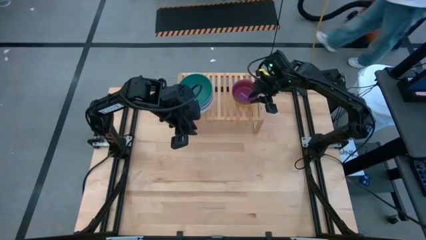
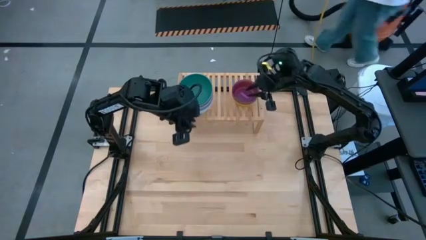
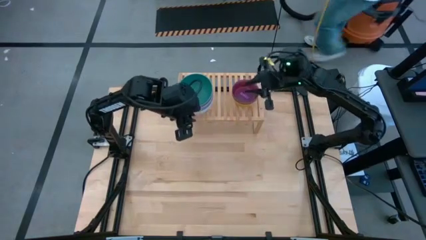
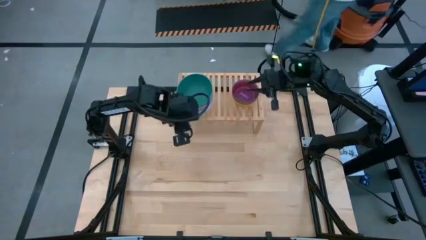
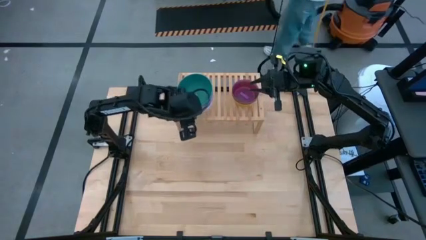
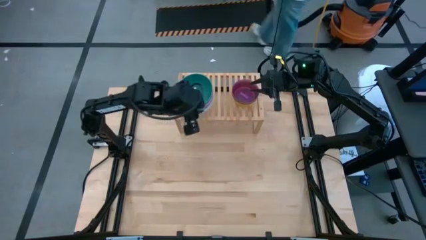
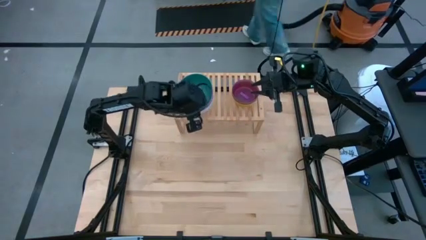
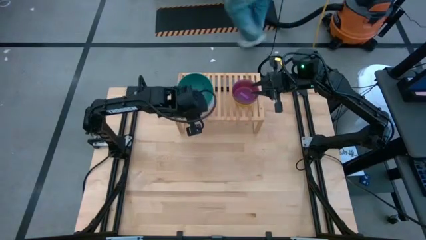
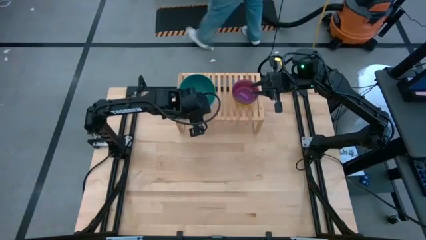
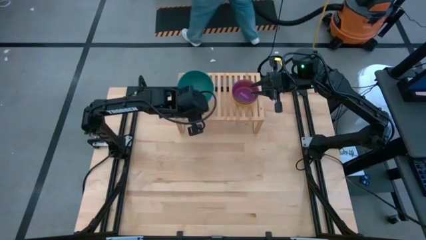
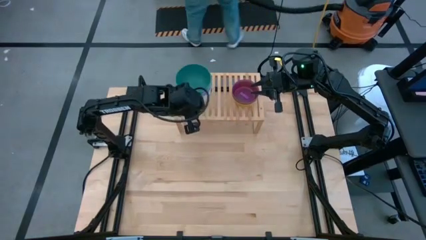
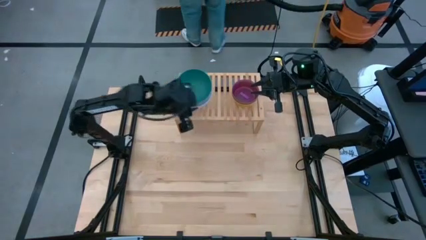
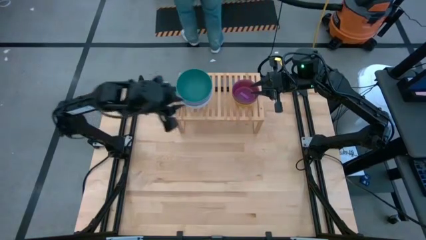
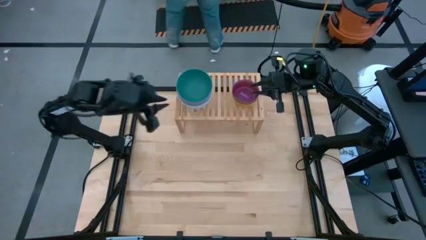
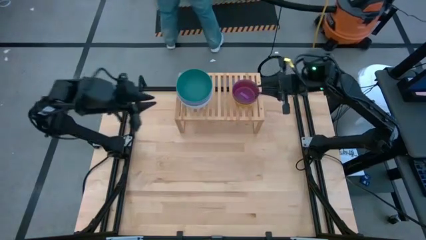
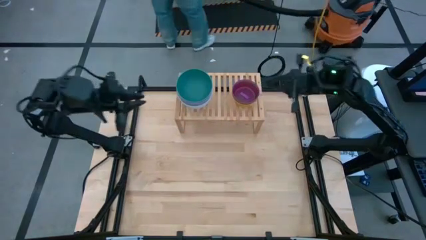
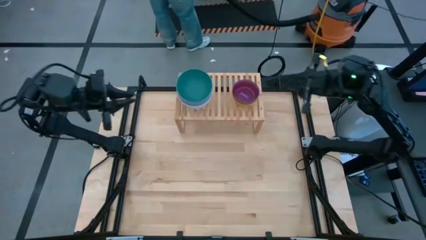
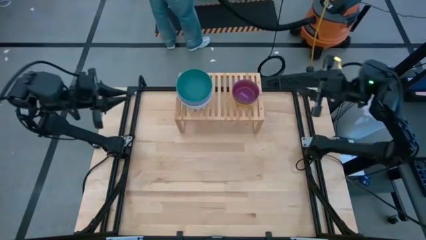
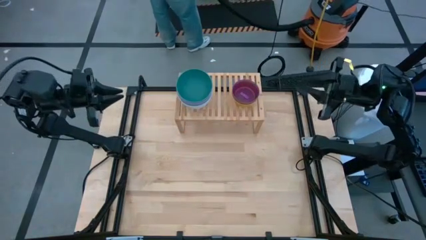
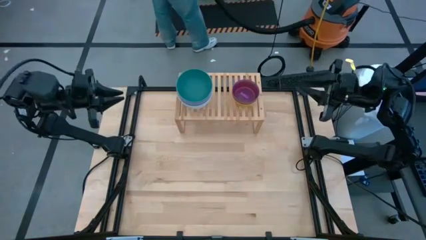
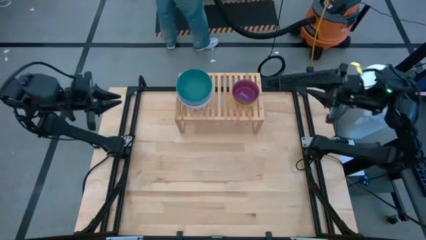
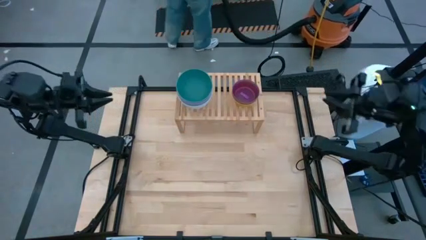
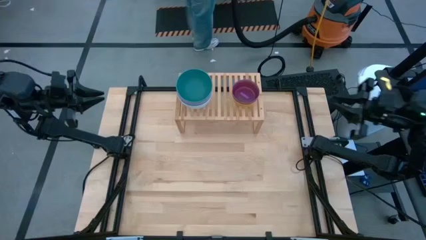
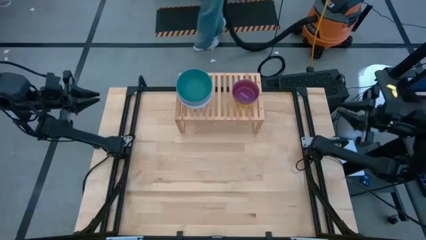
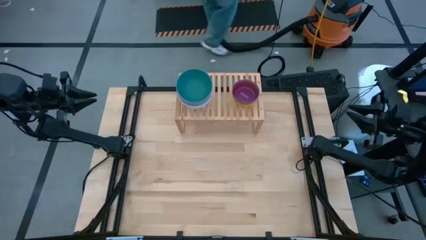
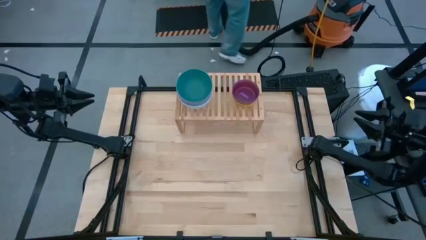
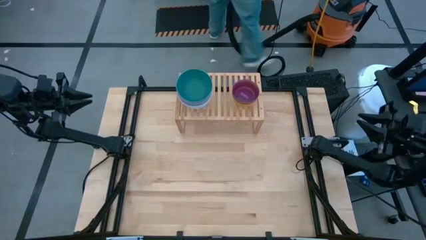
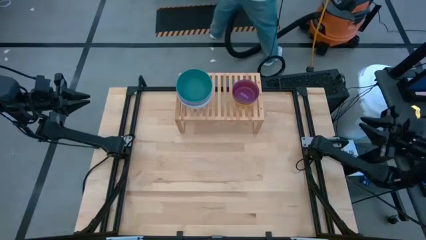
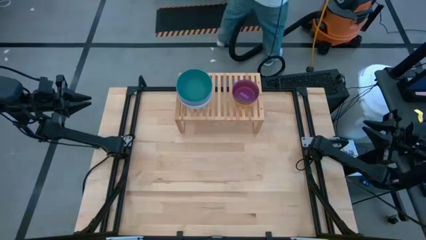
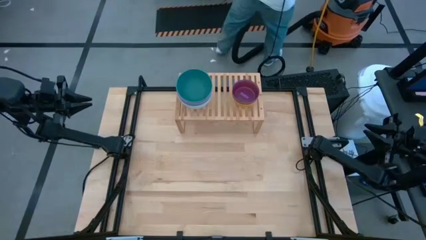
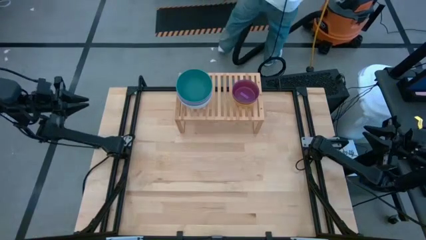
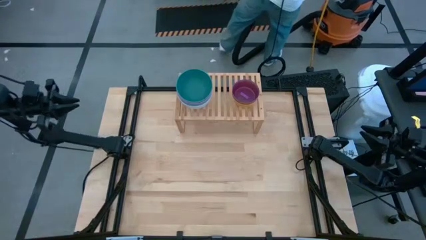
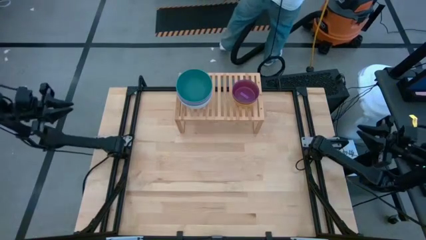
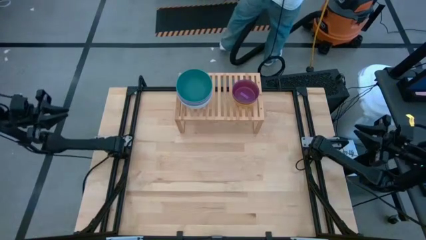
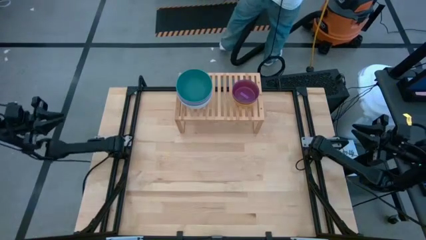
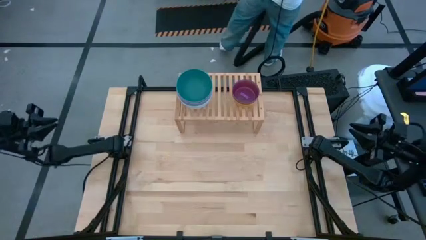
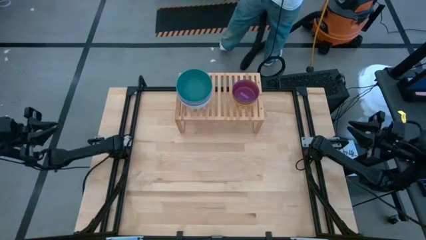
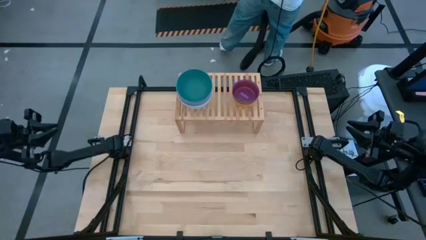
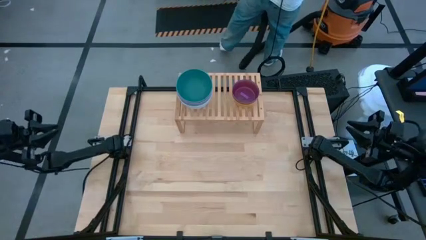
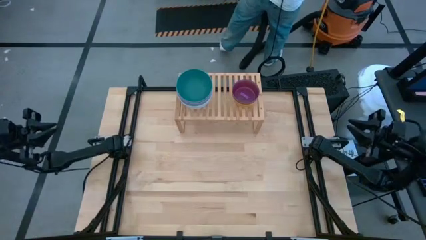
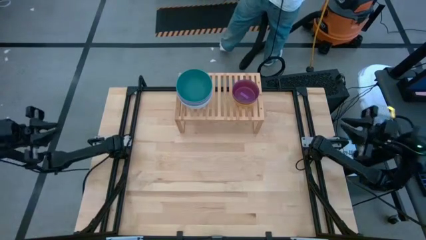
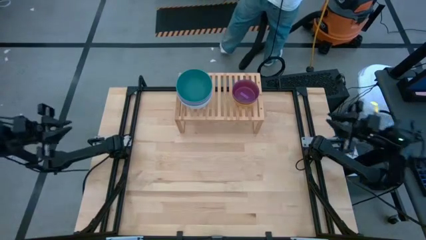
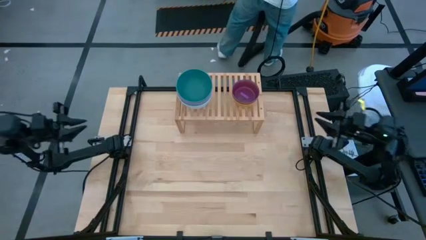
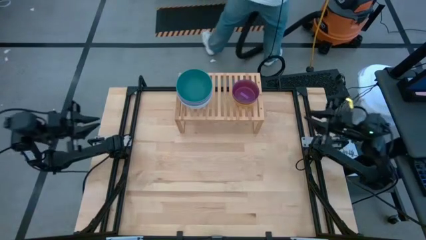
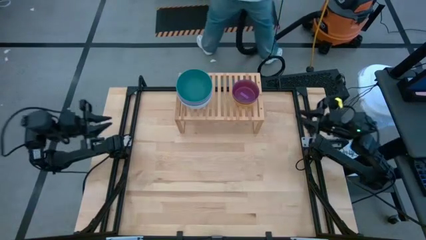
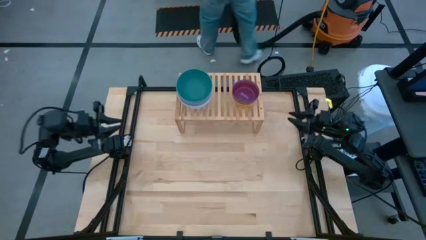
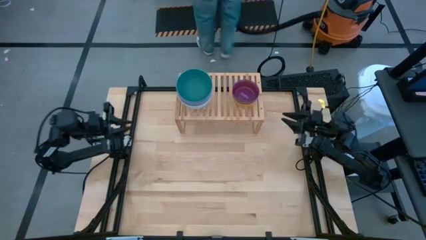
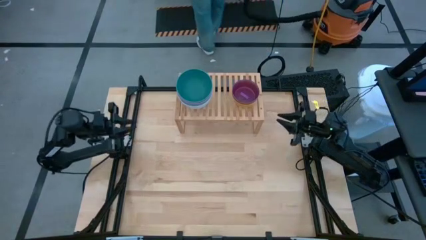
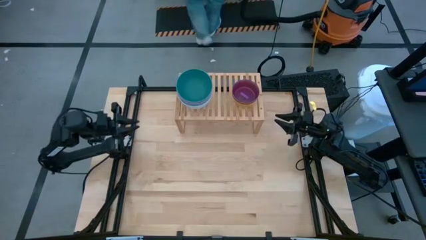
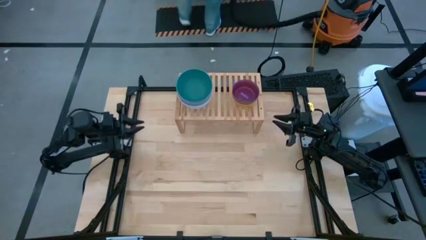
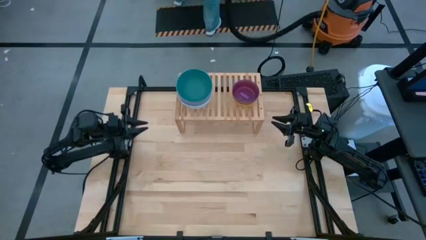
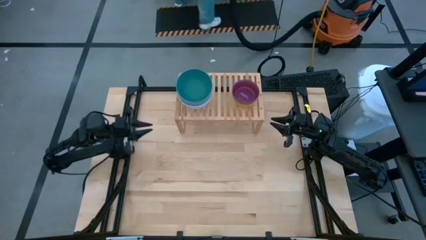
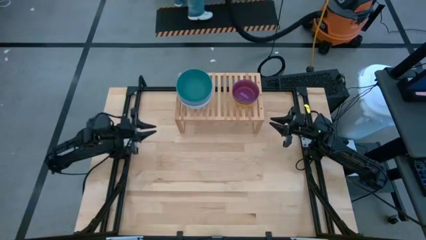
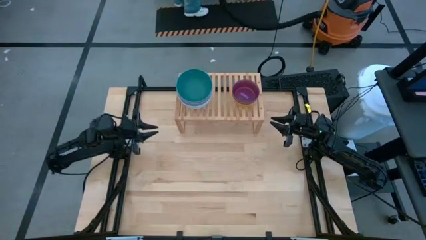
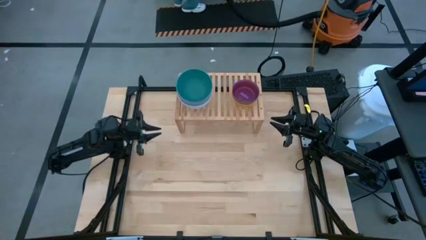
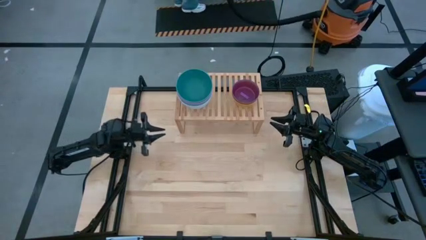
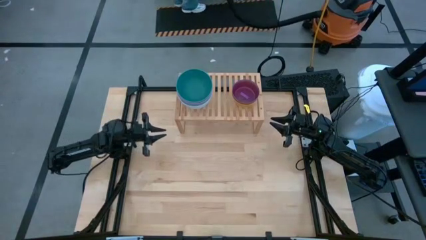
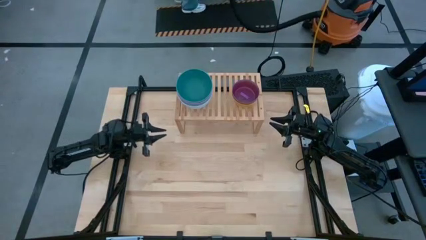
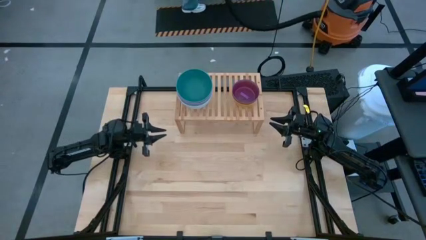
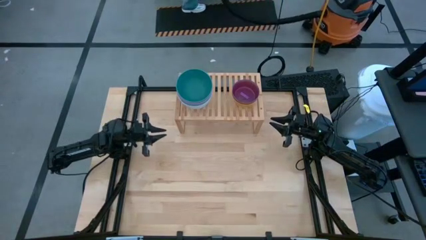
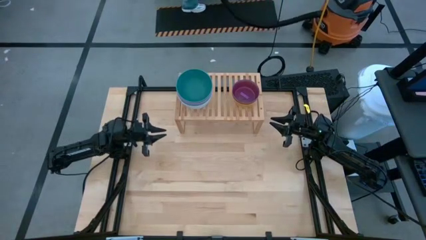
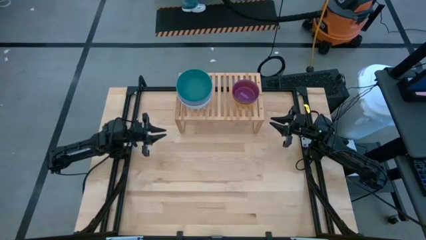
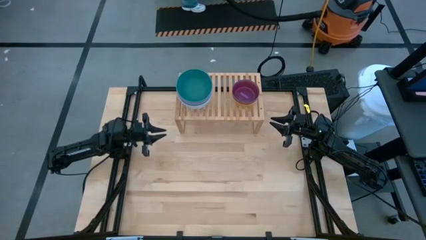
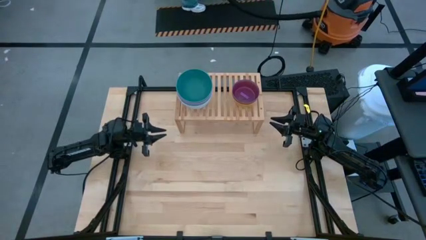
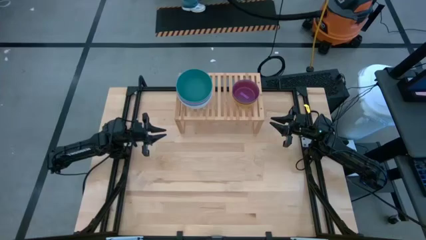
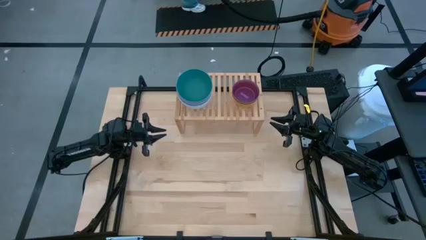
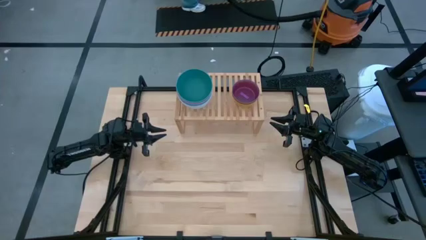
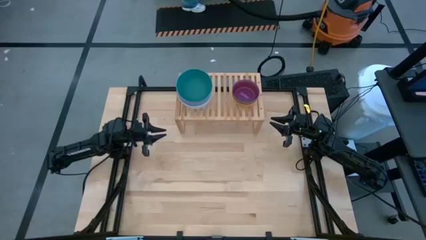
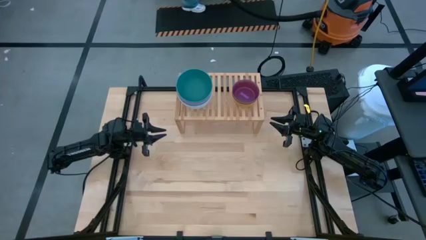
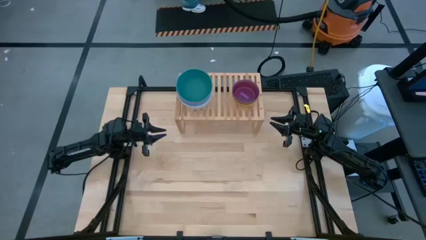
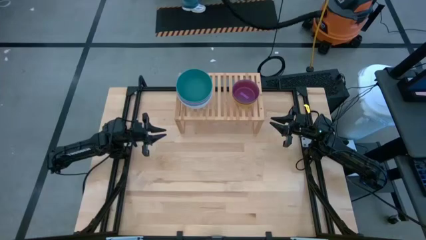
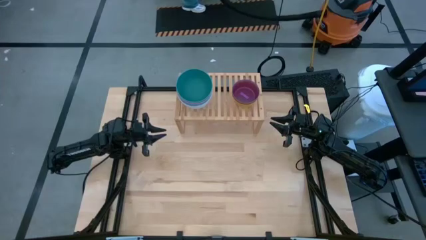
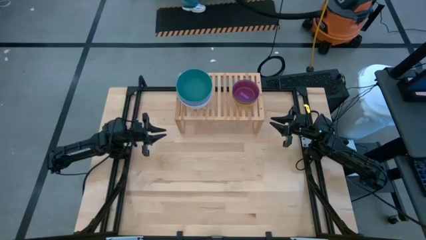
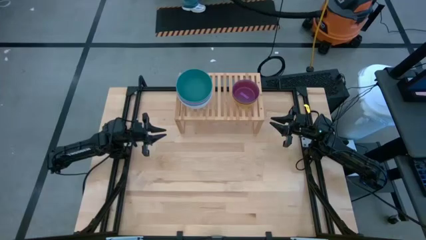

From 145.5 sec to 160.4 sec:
Task: Place and stack bowls onto a shelf
Return to Home Position

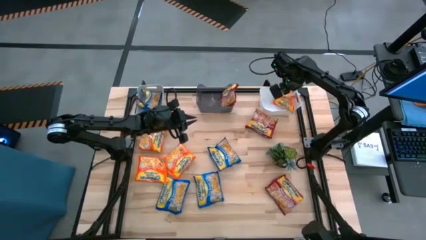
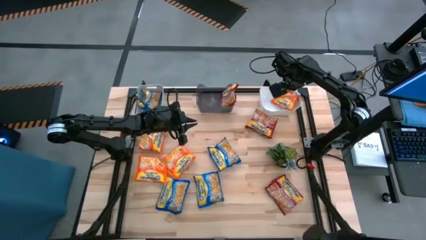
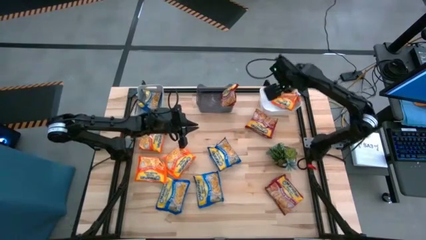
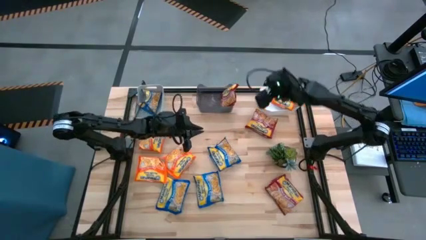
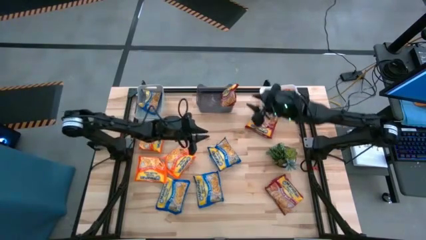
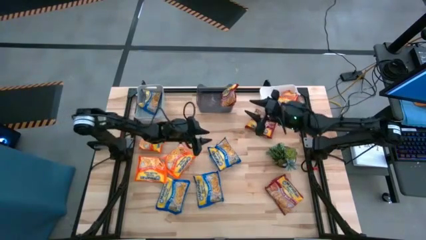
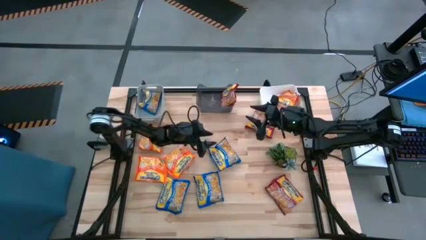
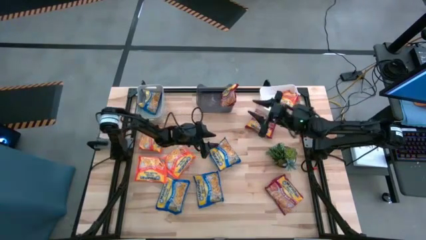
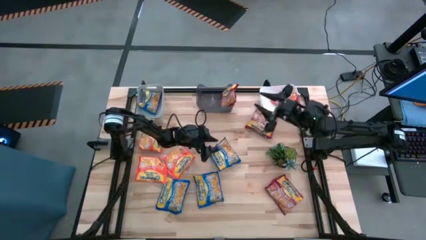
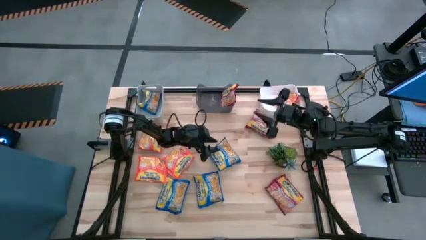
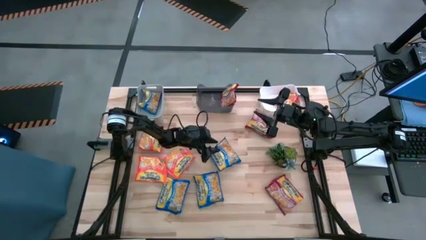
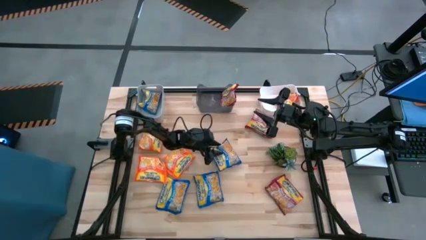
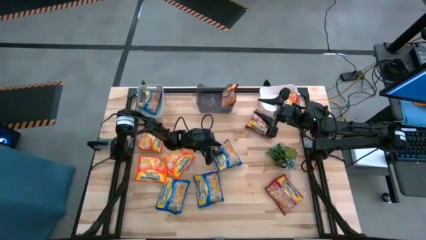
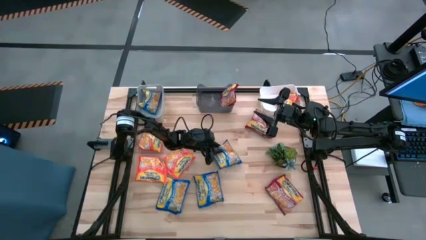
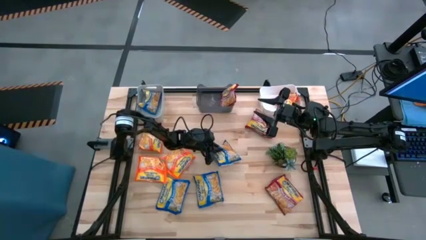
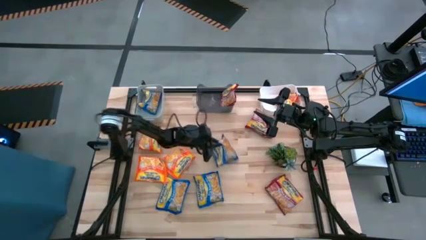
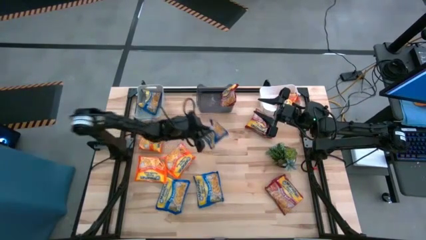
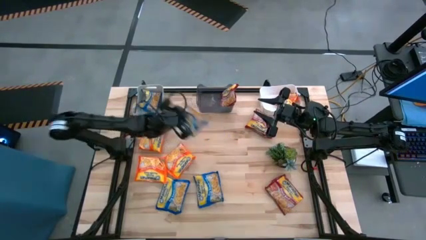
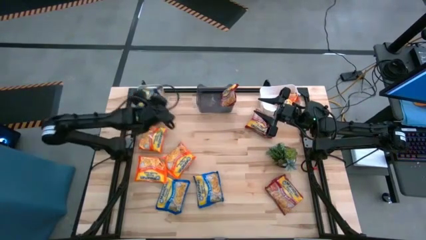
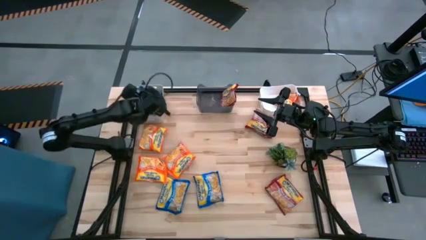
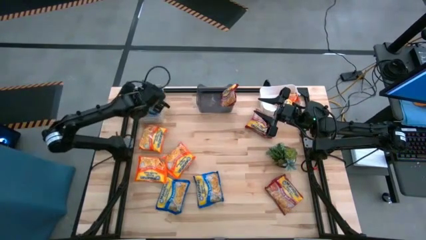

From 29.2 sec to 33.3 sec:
Task: Sort Maruchan noodles
Put the blue noodle pack into the gray bin
